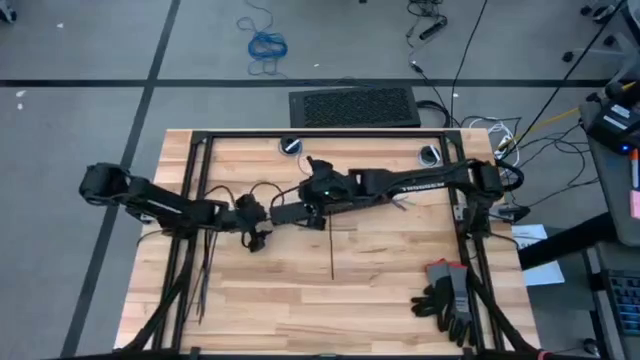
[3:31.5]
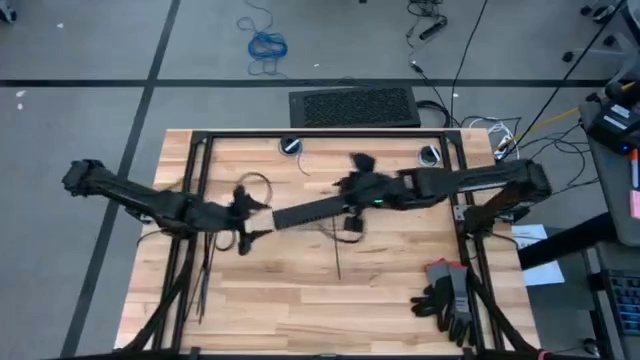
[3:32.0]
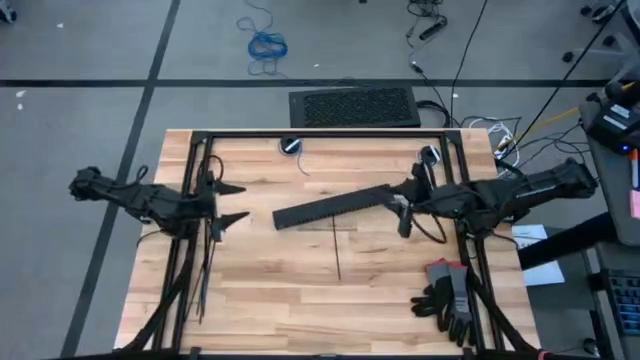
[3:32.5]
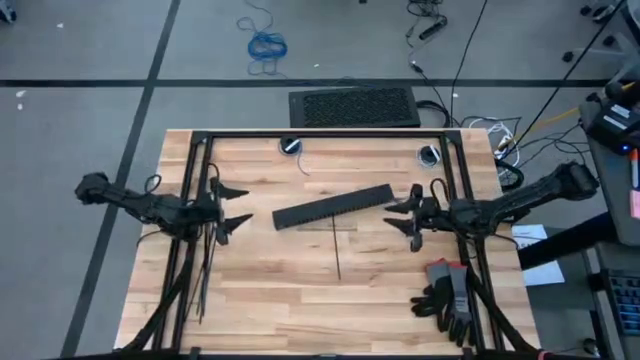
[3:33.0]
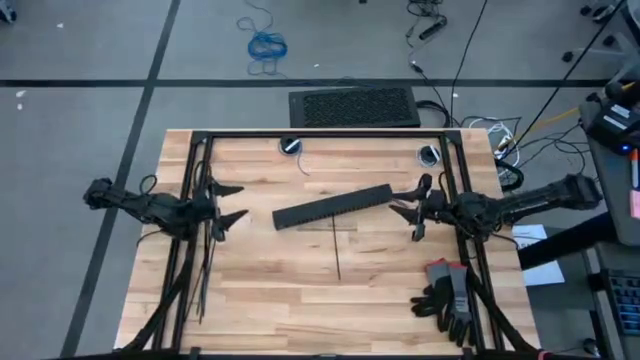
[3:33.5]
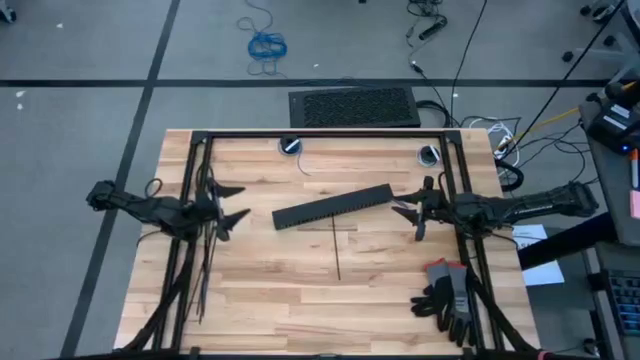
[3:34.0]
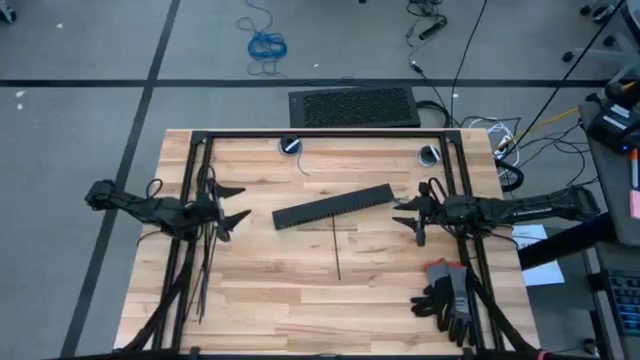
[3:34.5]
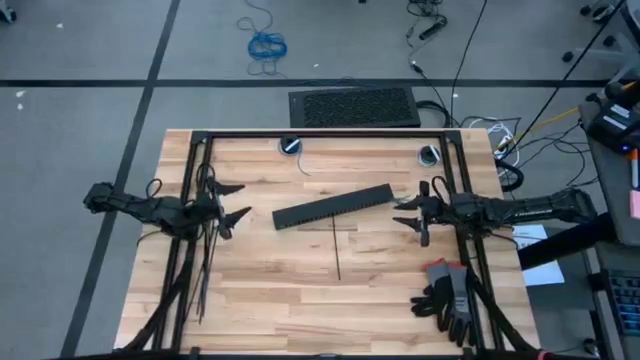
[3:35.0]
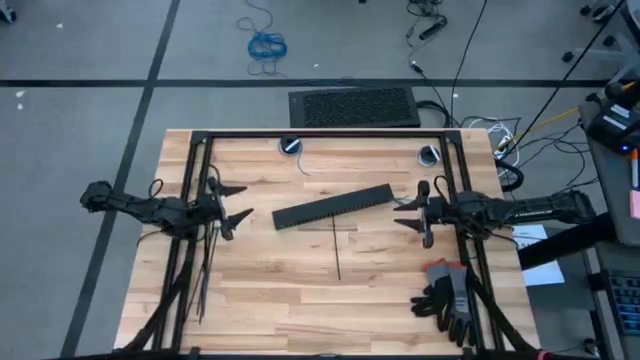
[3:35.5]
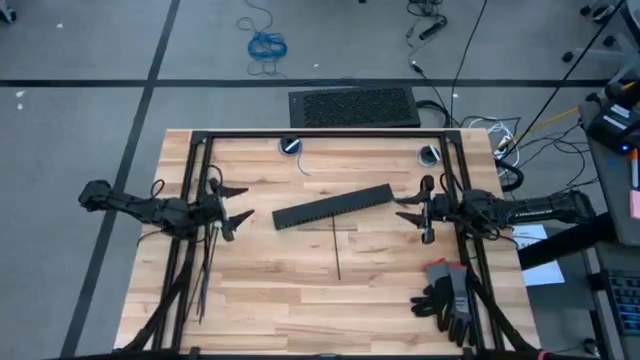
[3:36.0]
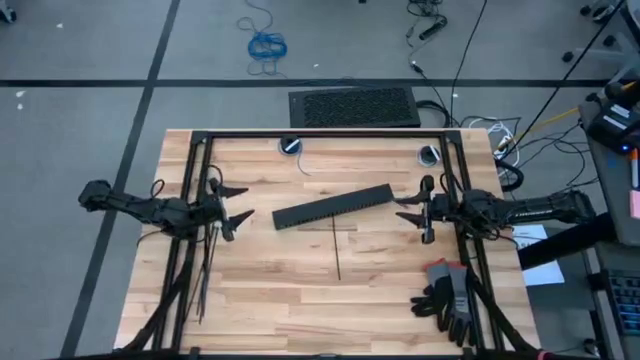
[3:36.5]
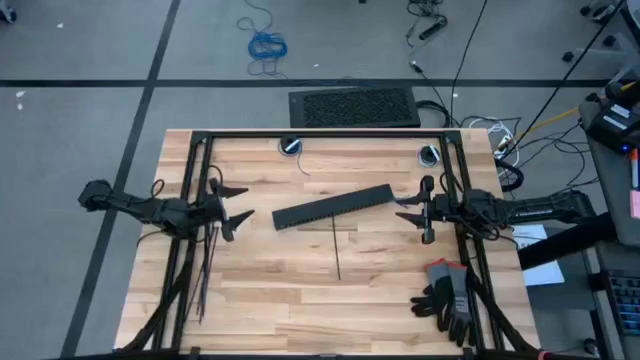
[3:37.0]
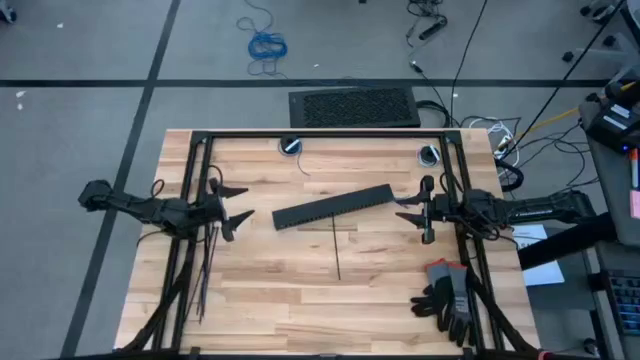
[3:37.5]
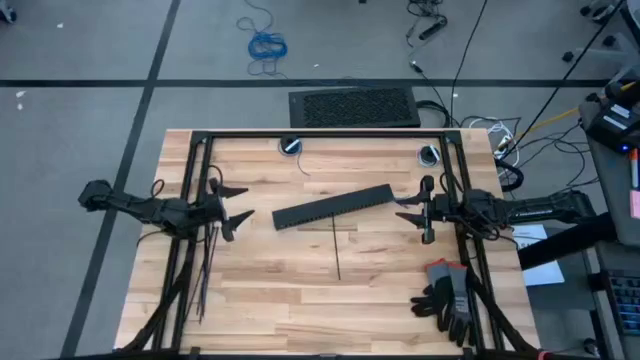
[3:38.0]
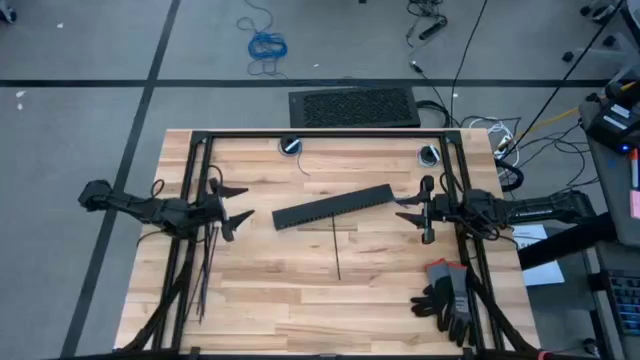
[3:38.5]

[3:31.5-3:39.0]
Task: Ziptie cables
Return to Home Position

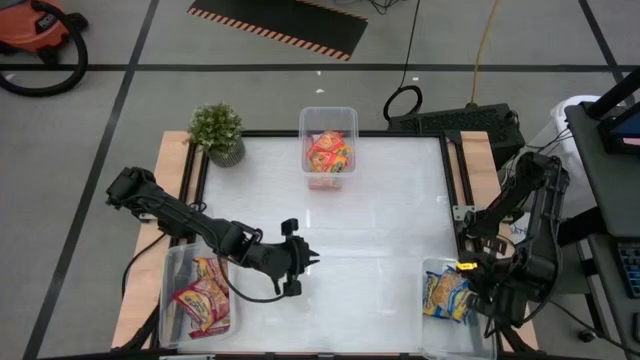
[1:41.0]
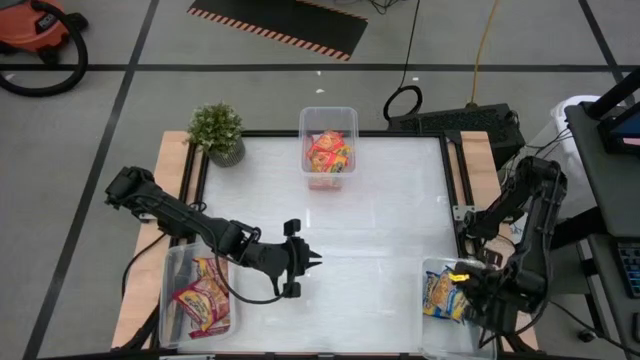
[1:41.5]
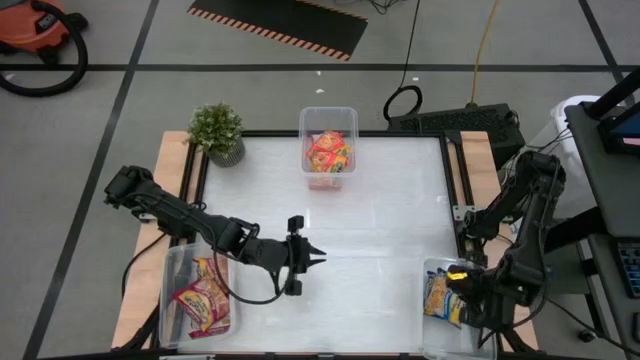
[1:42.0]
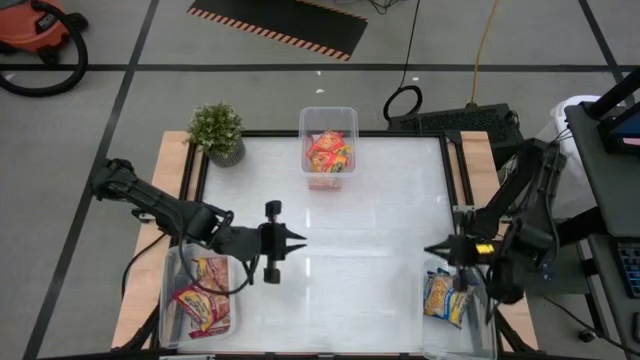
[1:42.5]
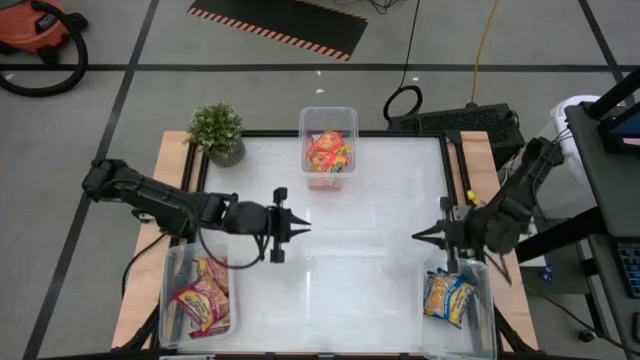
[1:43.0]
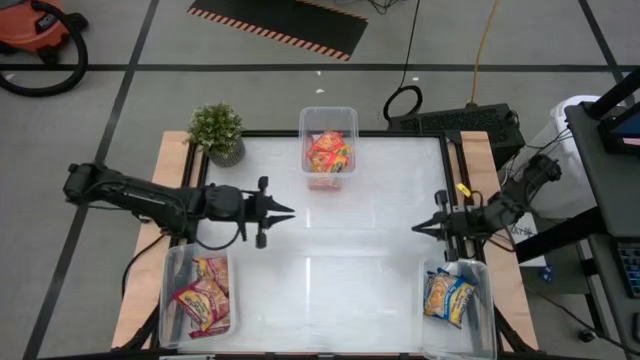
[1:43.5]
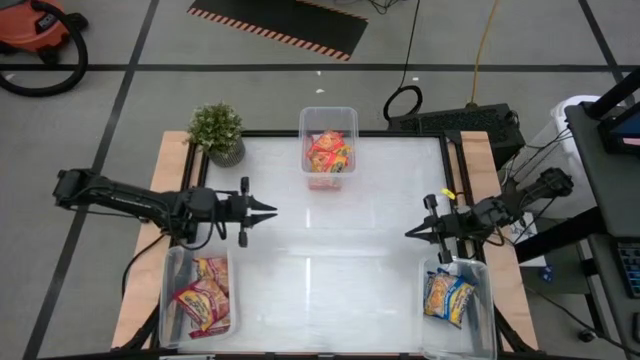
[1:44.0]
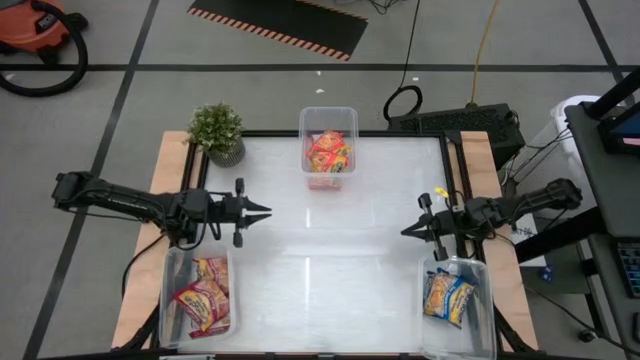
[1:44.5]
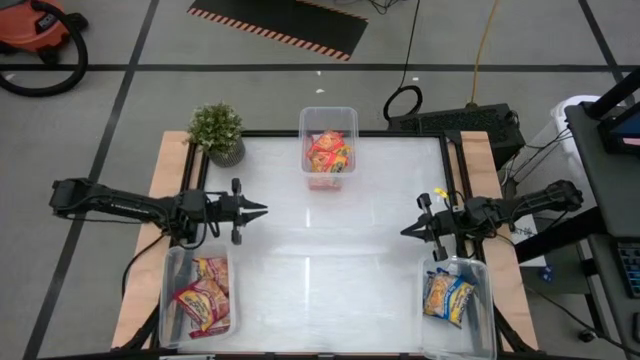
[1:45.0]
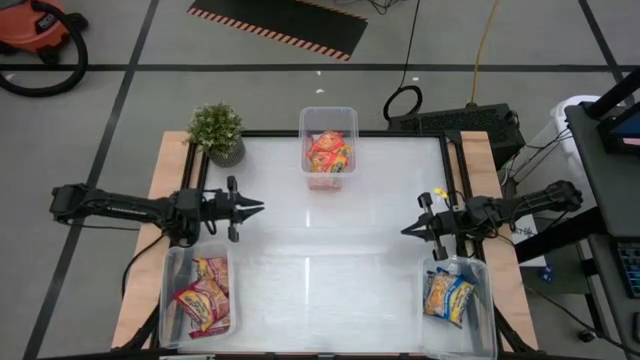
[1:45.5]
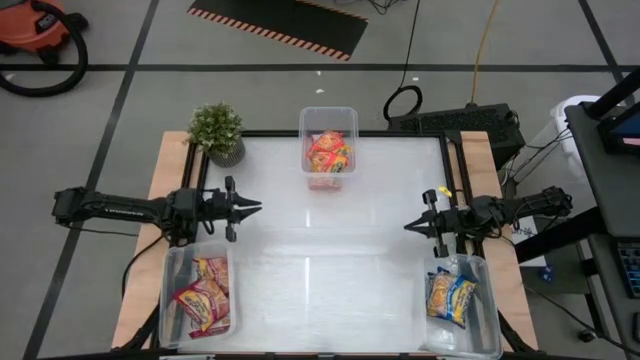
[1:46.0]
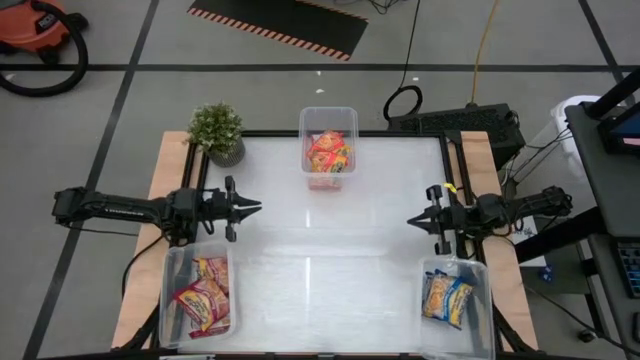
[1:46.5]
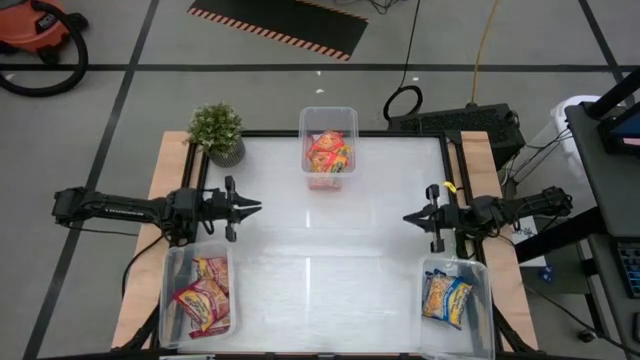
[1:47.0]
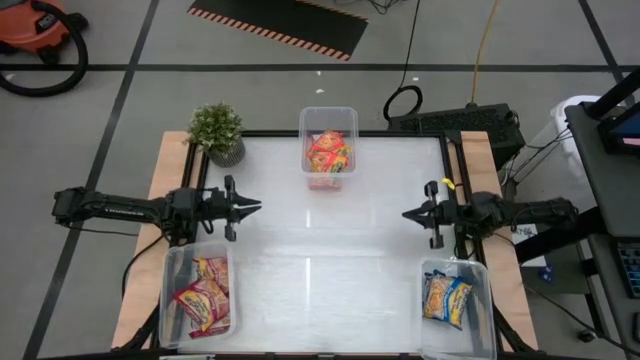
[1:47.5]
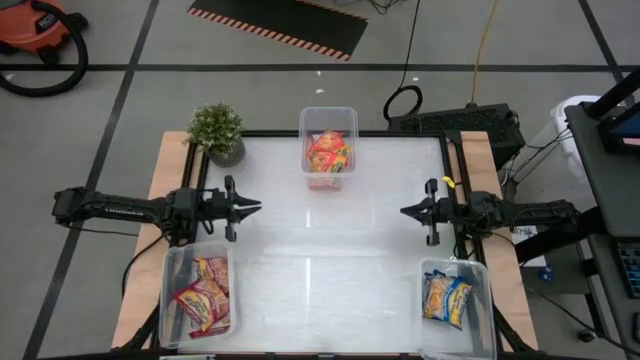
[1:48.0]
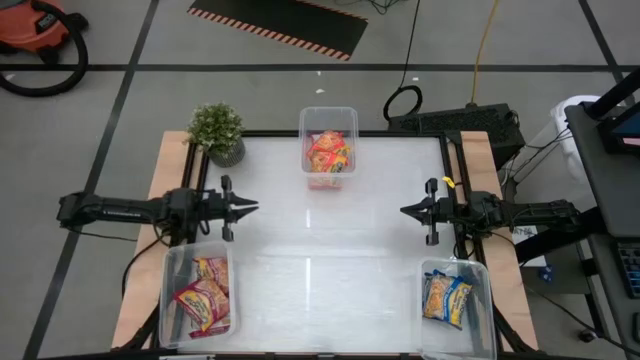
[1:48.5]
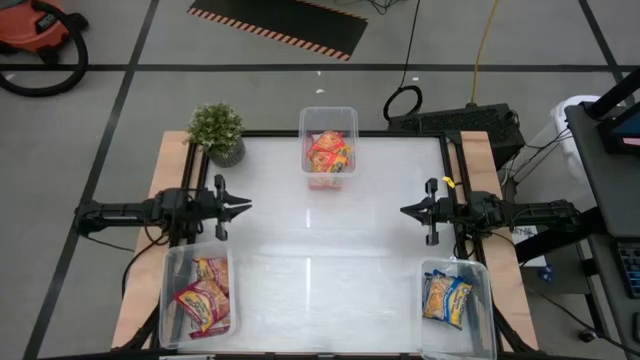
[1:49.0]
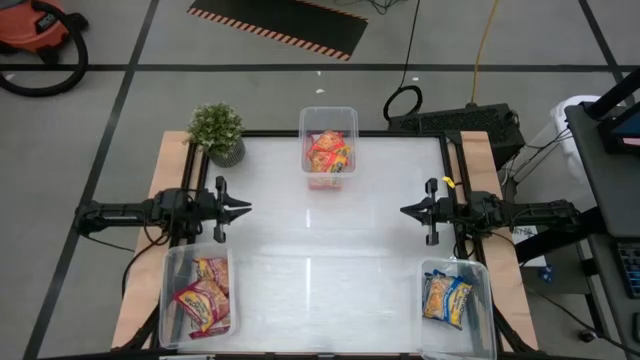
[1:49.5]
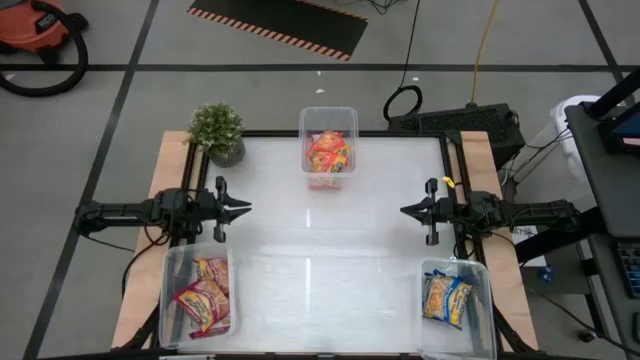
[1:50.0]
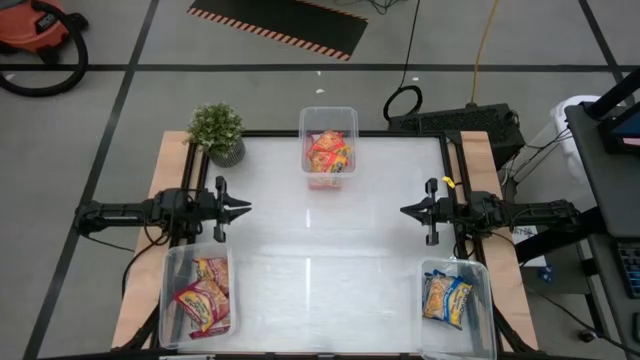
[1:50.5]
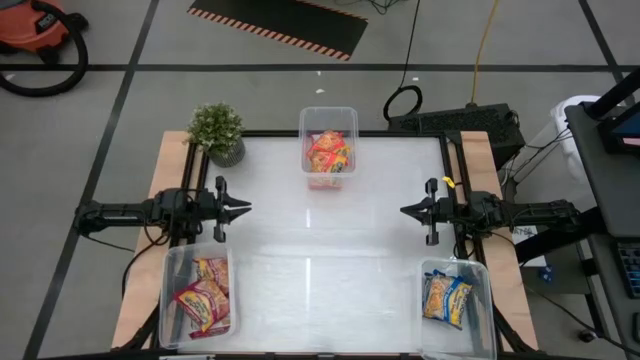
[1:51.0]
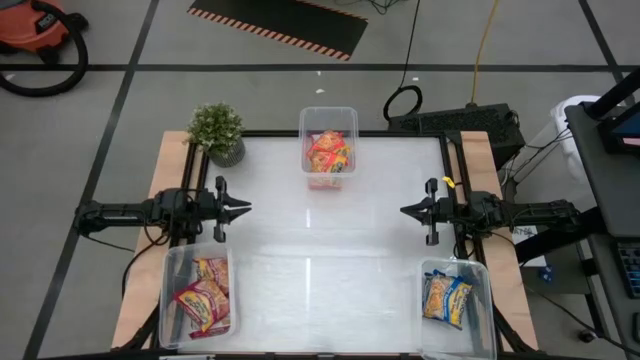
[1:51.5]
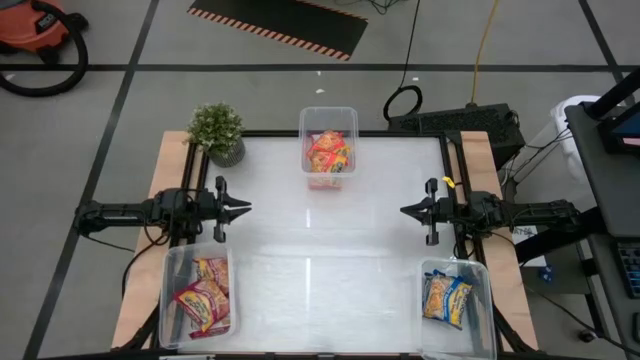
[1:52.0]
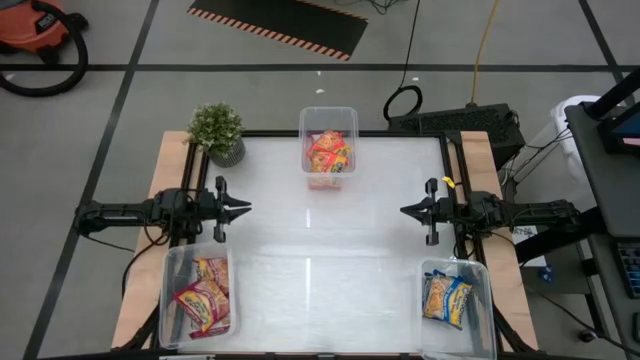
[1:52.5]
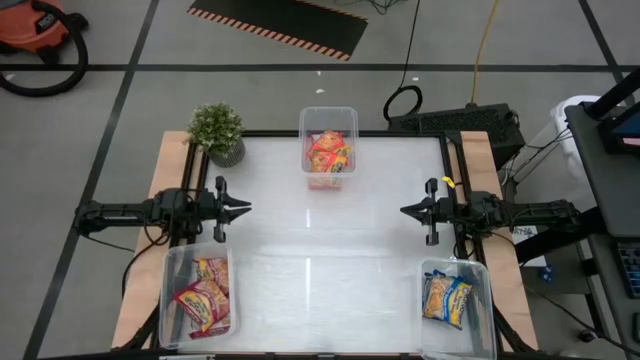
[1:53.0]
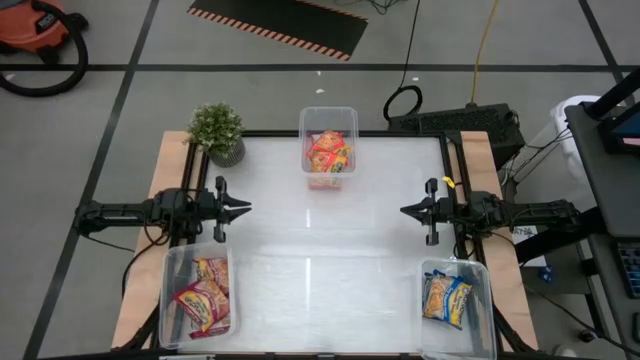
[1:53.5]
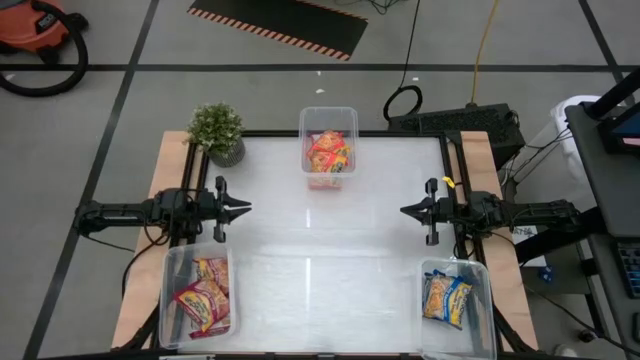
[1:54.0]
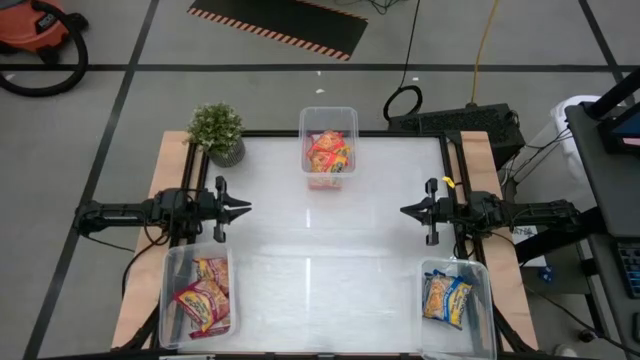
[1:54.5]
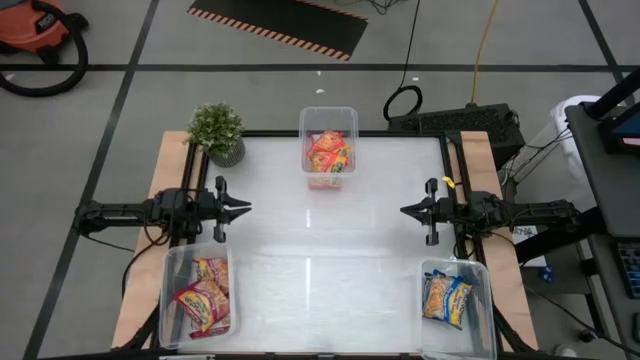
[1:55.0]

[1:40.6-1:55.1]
Task: Sort Maruchan noodles
Return to Home Position
